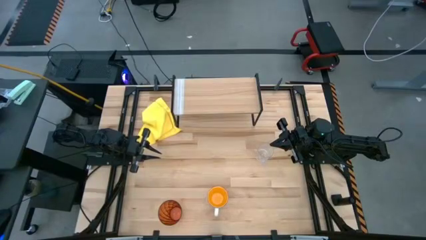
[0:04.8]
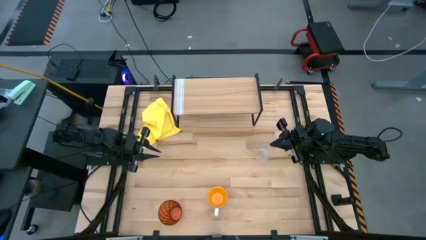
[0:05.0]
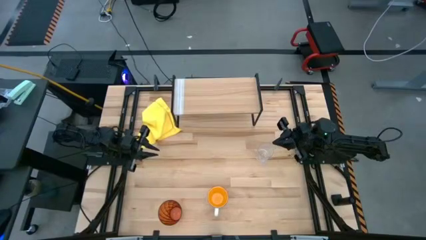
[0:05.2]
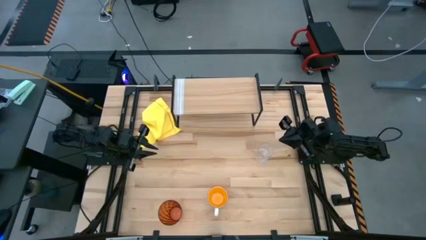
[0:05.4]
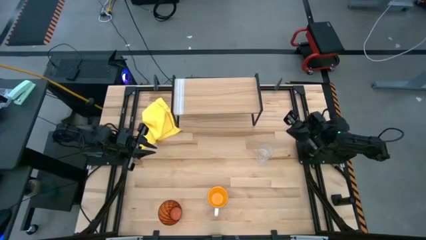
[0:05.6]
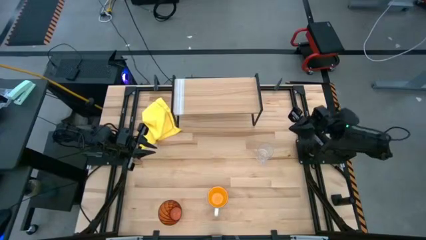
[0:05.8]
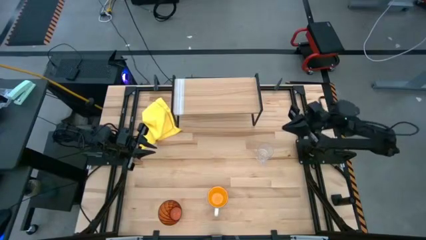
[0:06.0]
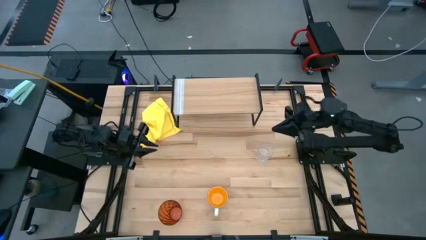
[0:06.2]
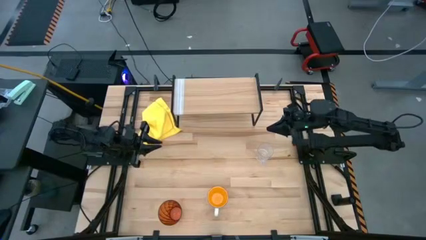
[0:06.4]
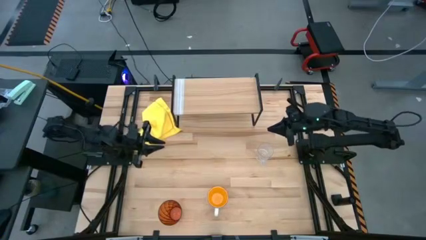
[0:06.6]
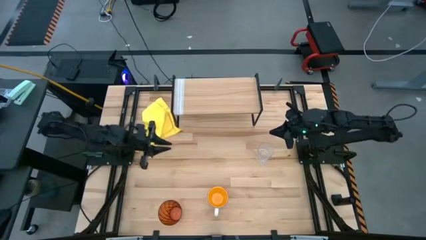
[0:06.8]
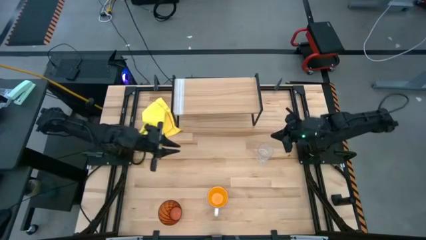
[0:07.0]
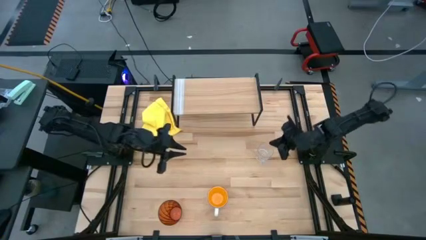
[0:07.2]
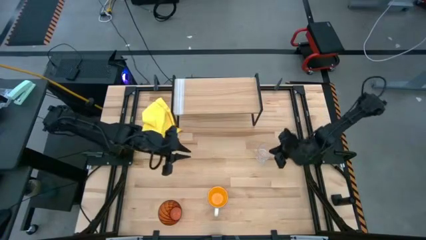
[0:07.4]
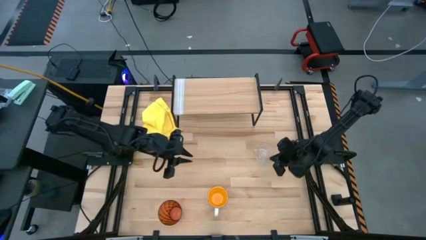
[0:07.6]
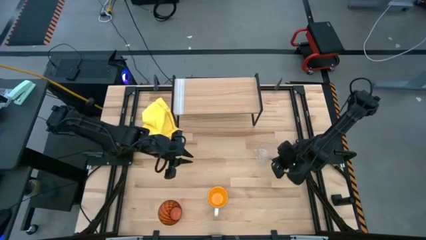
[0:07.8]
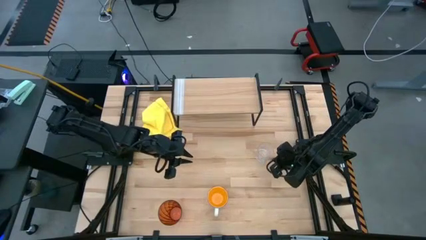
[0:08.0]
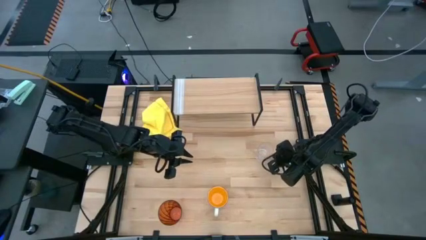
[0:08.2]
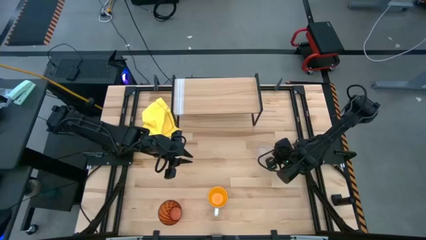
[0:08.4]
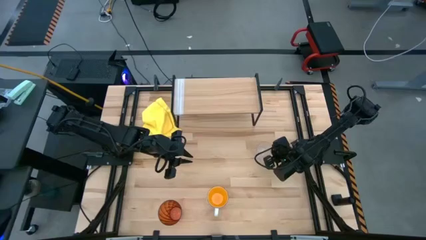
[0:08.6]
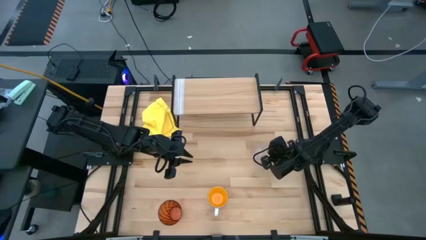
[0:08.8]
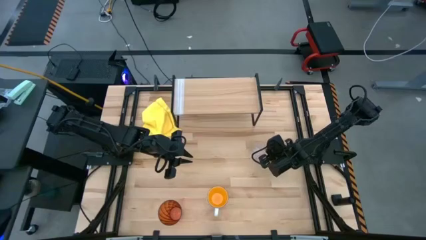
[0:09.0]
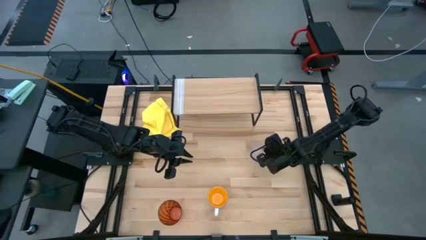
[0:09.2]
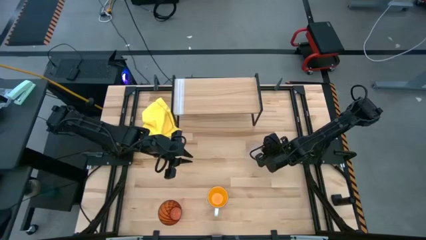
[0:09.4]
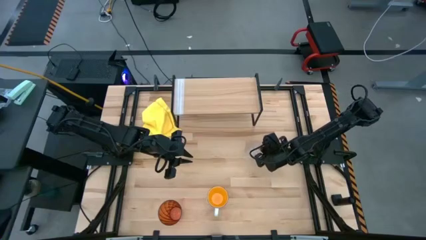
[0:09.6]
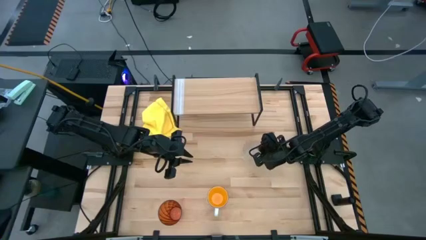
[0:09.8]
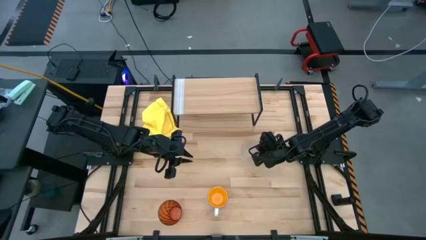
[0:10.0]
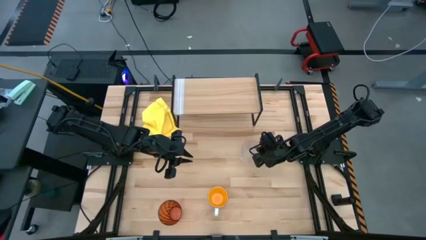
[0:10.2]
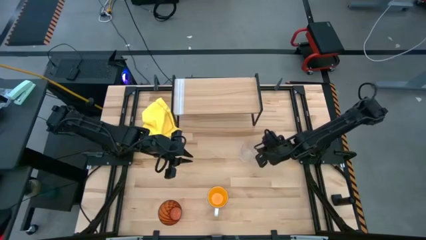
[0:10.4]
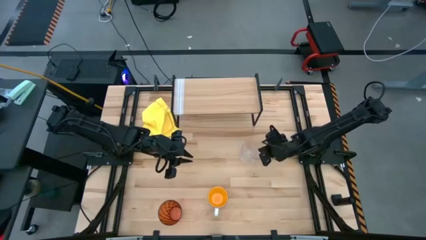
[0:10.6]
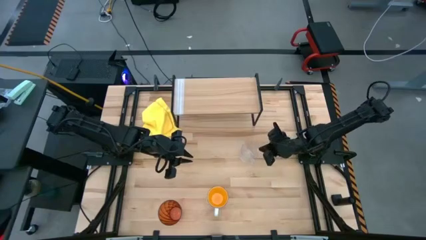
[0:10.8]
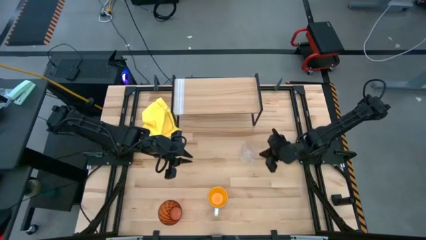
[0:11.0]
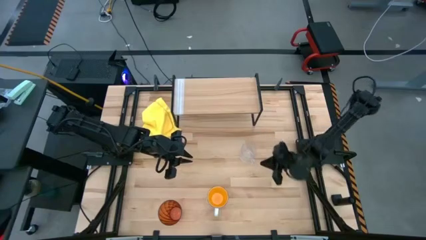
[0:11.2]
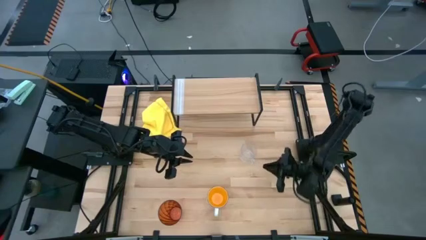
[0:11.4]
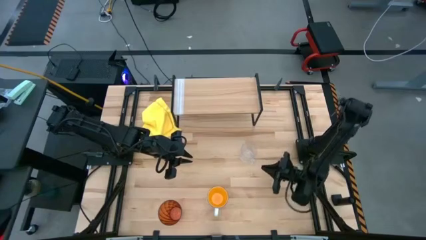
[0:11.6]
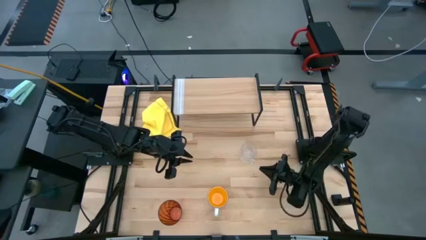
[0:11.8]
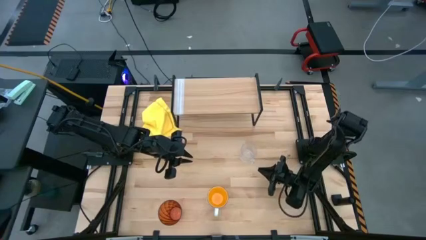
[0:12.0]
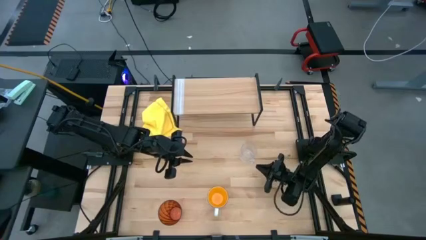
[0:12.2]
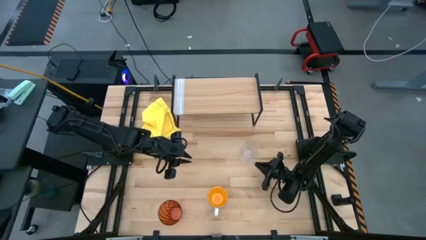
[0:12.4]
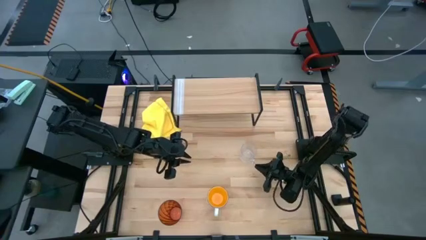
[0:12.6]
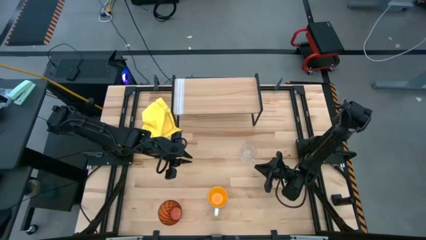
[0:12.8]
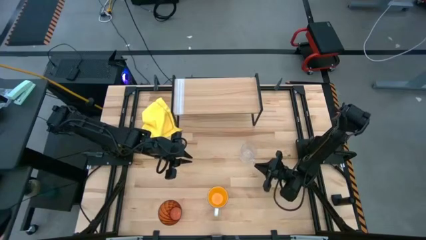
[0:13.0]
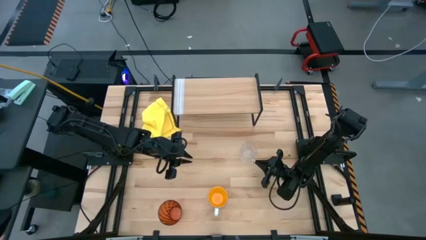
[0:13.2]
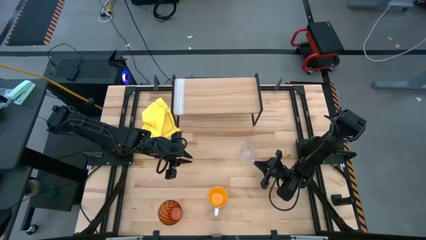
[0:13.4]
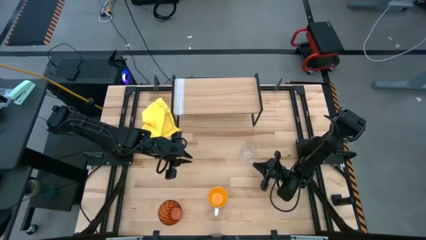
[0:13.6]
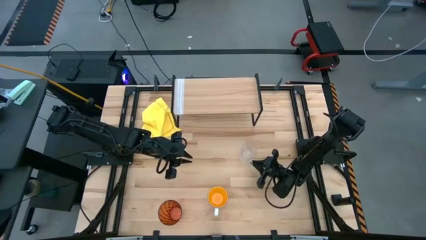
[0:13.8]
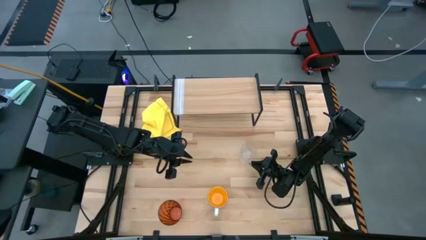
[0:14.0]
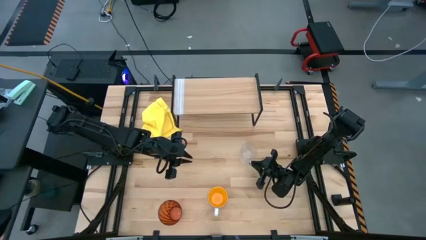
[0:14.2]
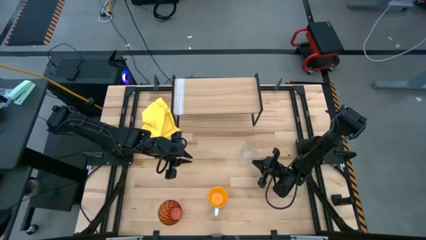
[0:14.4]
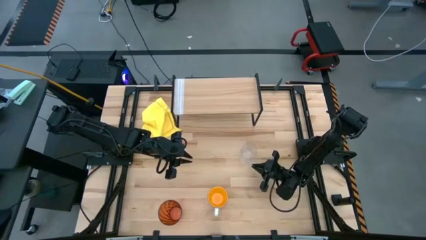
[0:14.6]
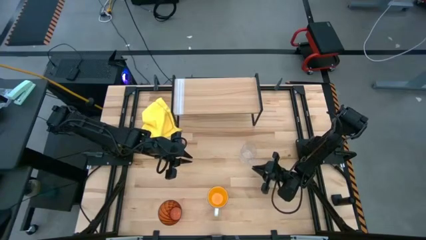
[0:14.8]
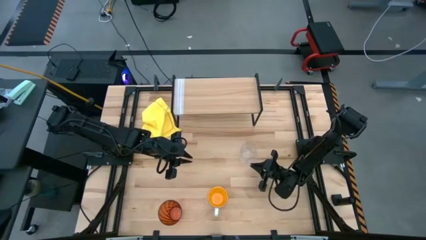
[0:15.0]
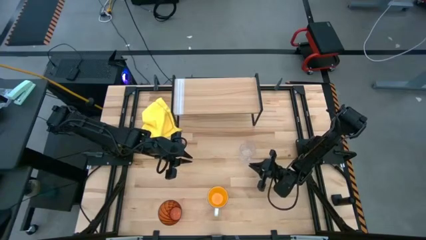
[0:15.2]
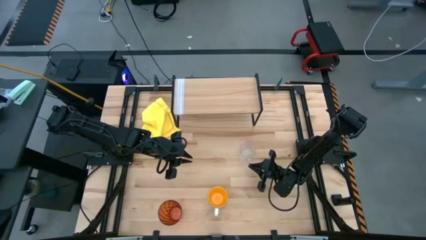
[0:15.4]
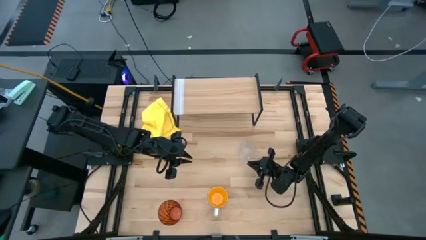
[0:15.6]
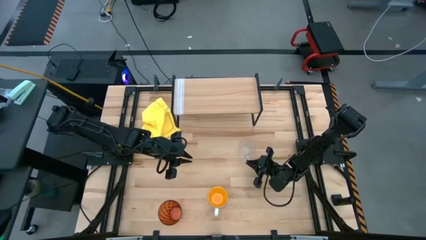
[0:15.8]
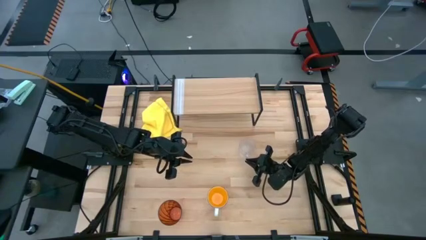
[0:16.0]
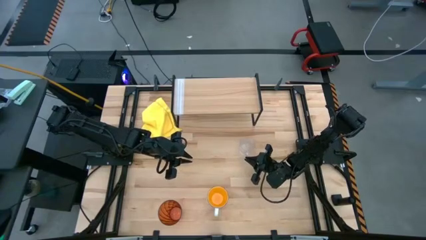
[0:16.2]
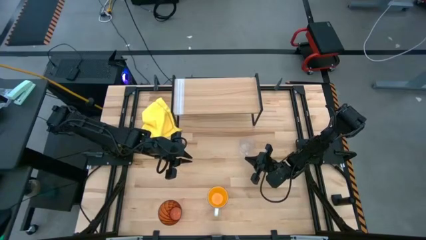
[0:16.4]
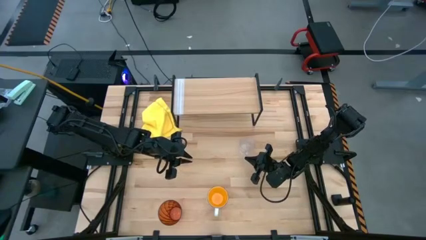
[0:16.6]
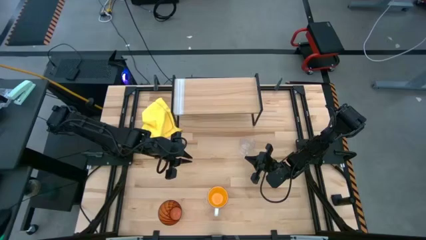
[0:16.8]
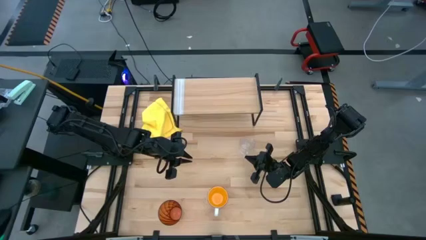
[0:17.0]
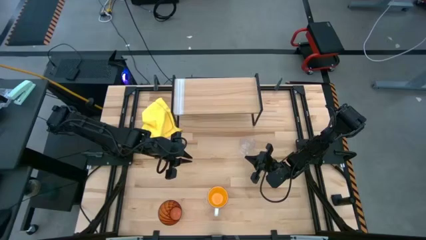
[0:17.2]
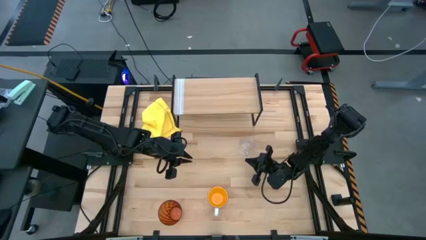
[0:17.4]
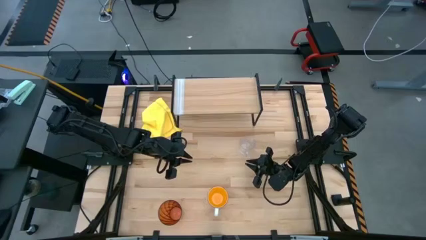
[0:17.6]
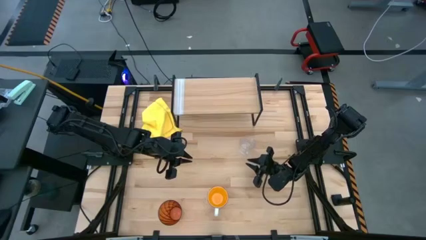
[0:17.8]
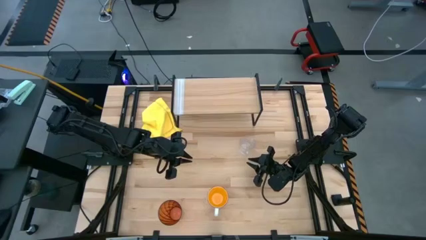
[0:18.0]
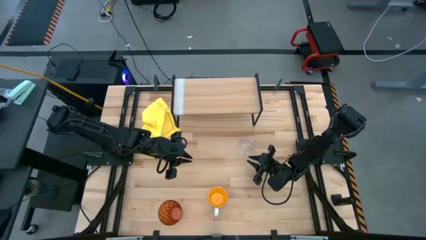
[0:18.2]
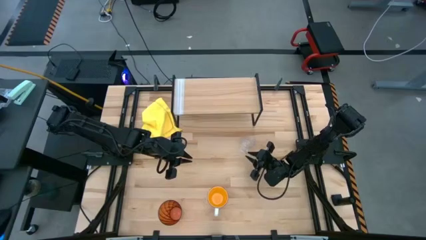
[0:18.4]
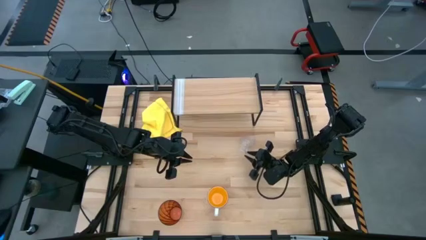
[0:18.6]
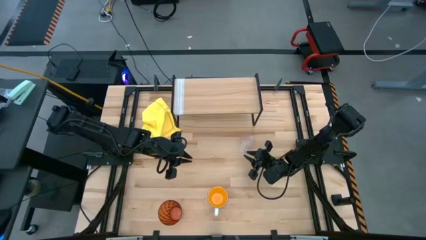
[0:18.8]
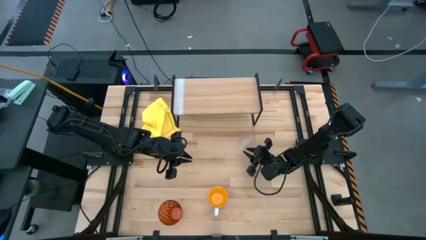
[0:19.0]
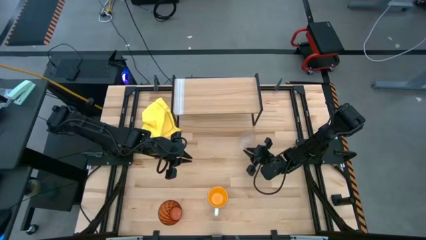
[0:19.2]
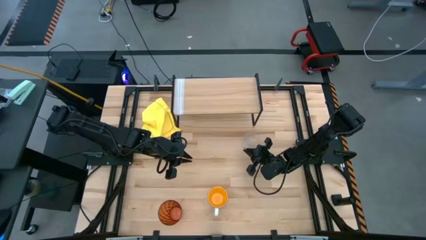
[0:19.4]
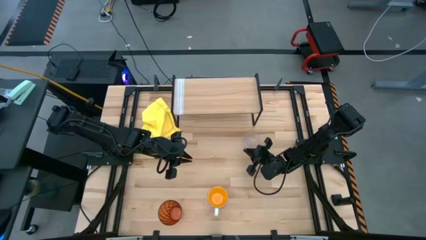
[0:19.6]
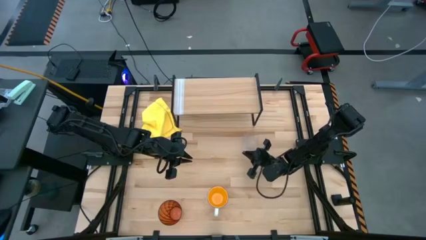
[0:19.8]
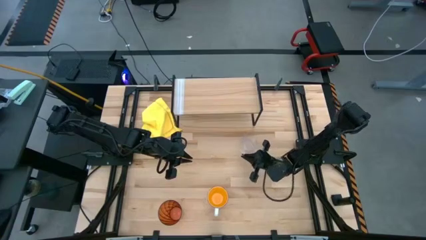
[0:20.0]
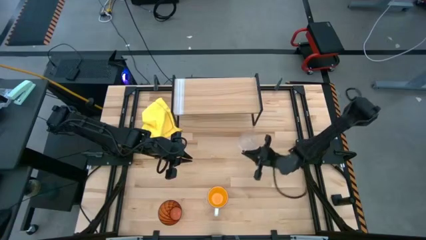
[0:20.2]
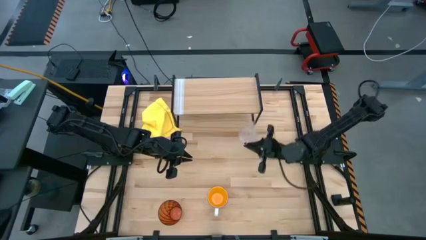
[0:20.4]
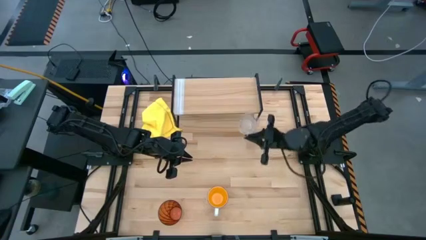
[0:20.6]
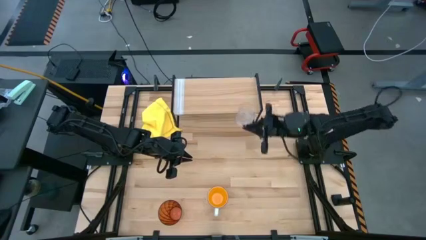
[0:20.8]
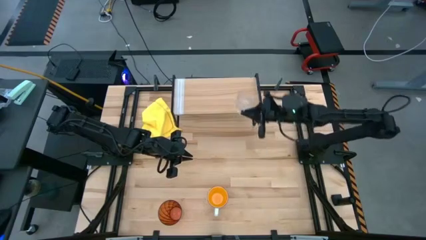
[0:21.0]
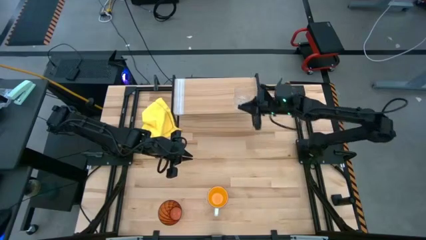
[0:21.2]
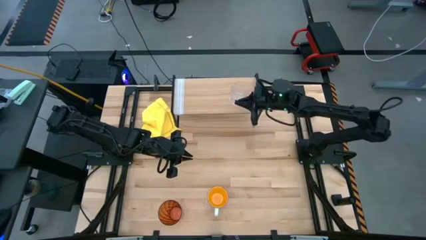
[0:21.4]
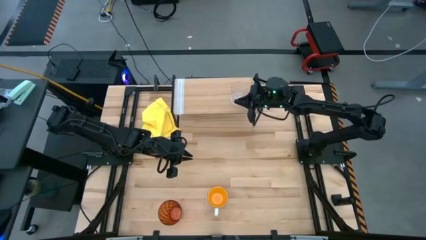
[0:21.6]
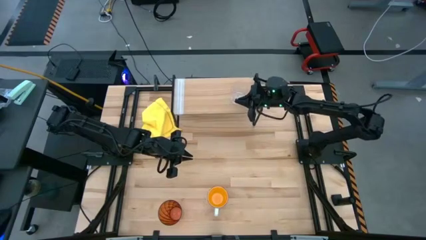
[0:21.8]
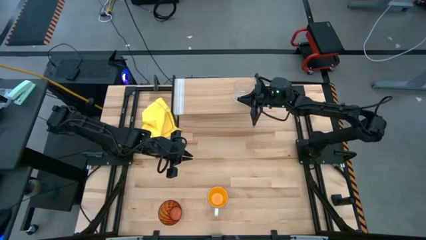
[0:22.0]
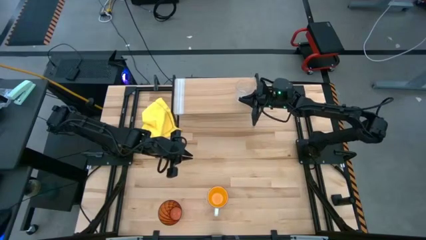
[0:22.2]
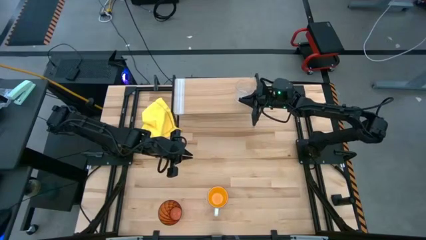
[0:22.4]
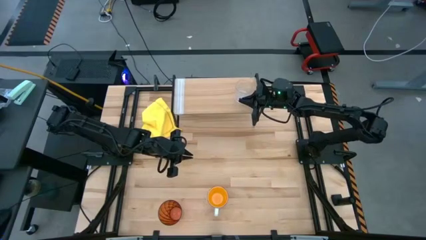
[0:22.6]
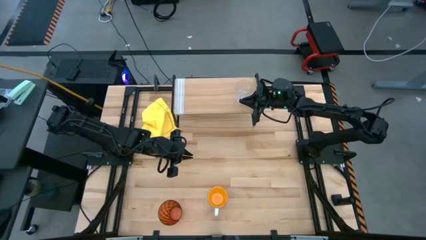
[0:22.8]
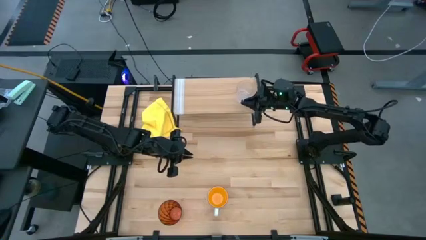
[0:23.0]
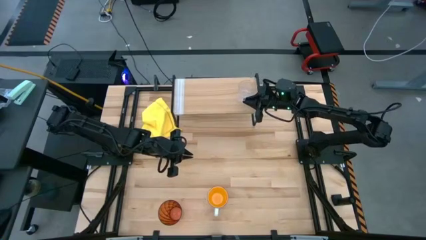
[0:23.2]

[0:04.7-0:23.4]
Task: Stack small to large cups/mugs on shelf
Put the transparent mug on the shelf
